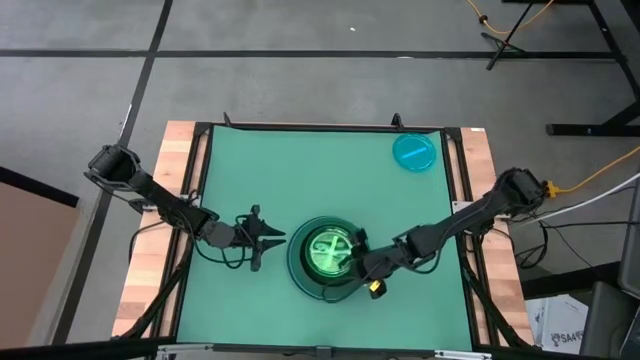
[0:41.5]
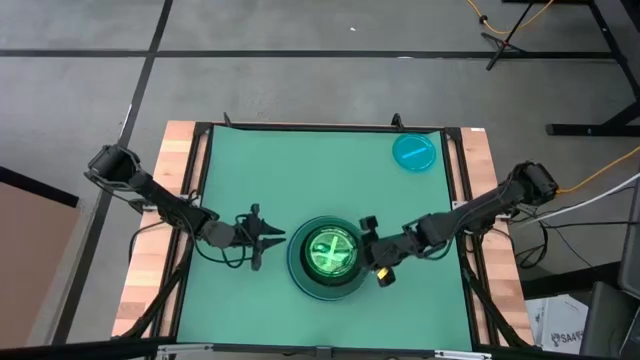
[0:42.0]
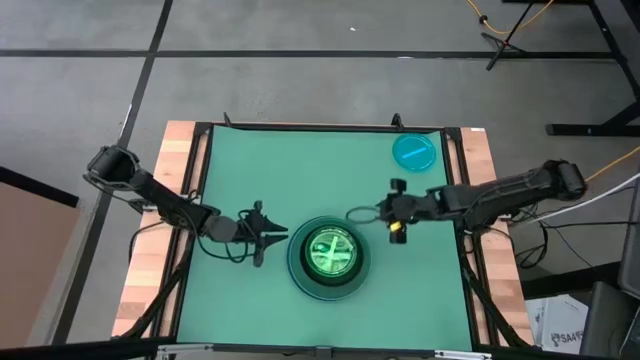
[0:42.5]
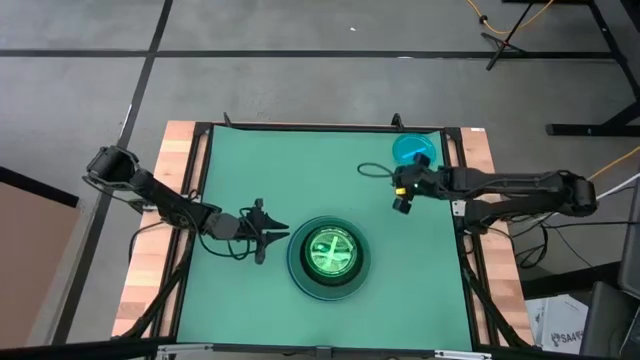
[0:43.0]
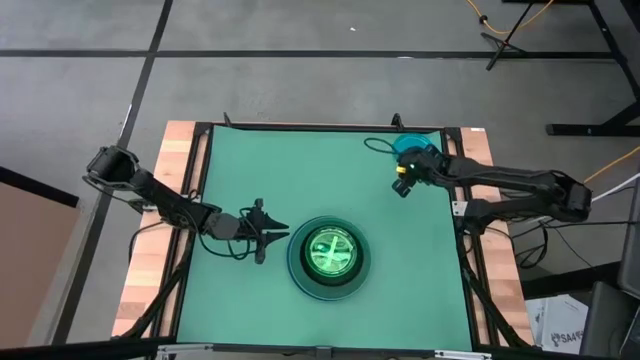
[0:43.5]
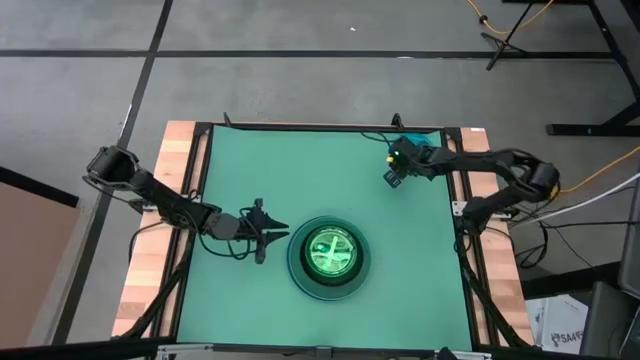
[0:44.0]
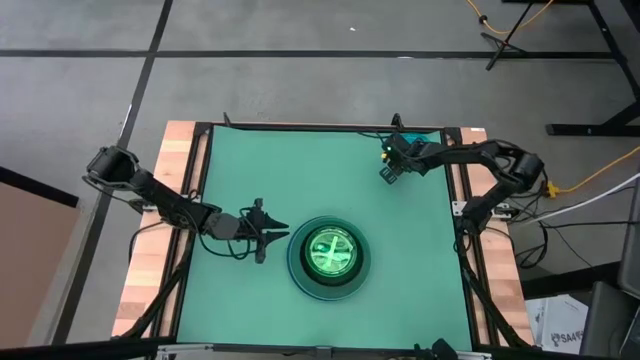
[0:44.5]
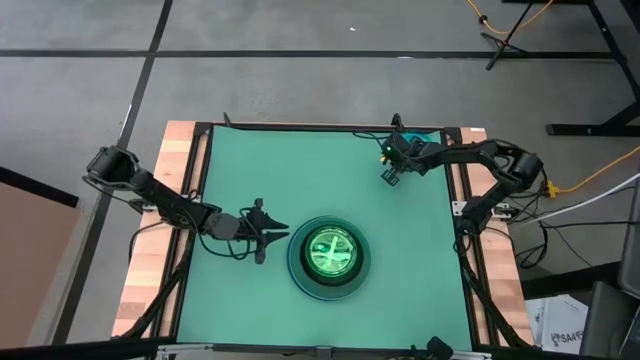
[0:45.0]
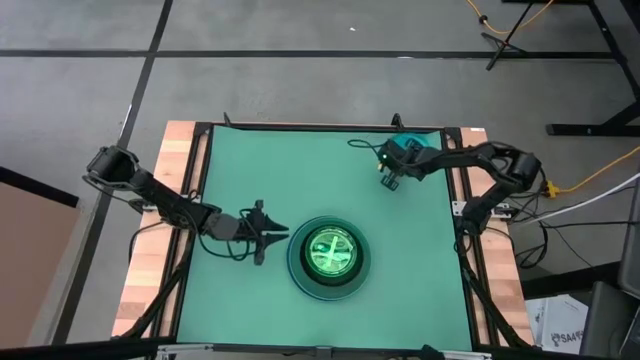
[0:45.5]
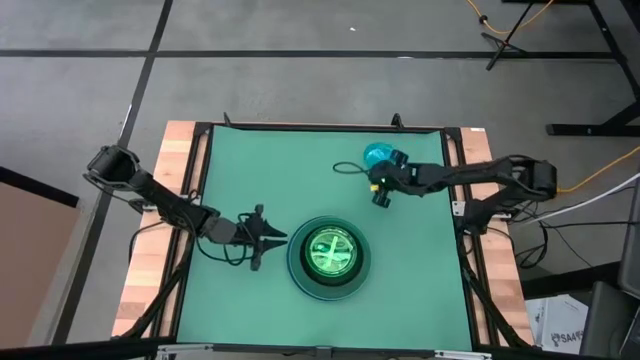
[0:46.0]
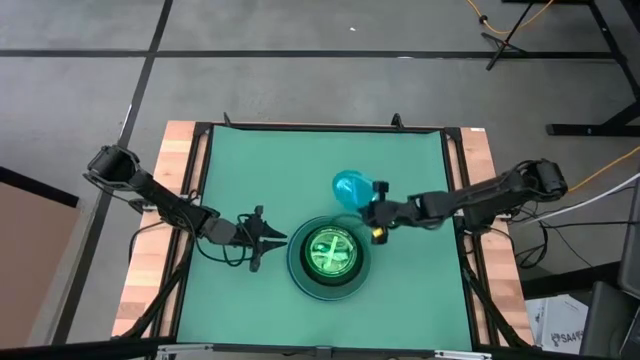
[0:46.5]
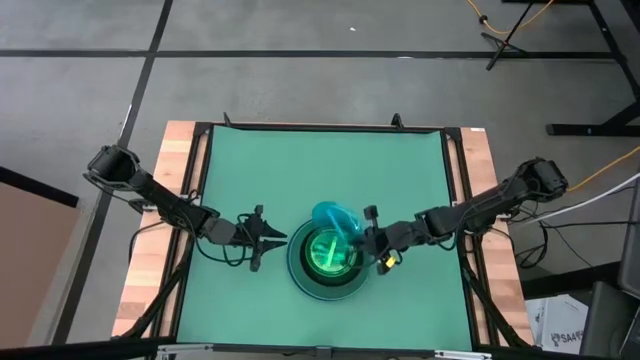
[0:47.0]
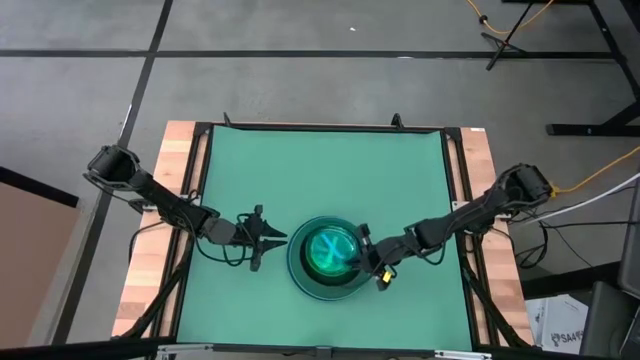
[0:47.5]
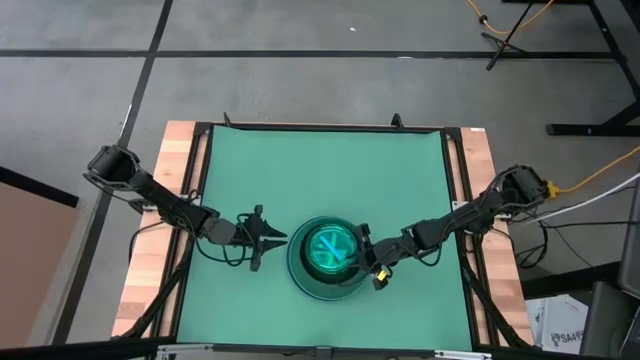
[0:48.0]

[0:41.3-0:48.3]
Task: Stack plastic plates
Stack the blue plate on the green plate

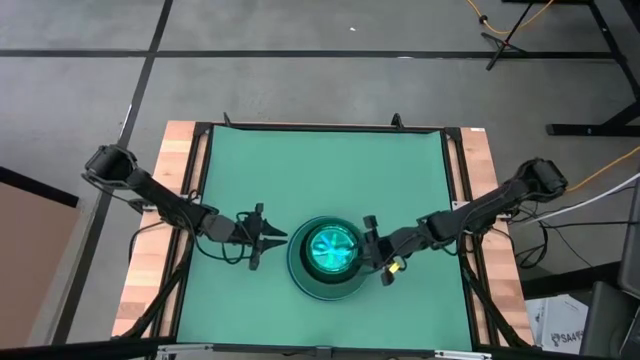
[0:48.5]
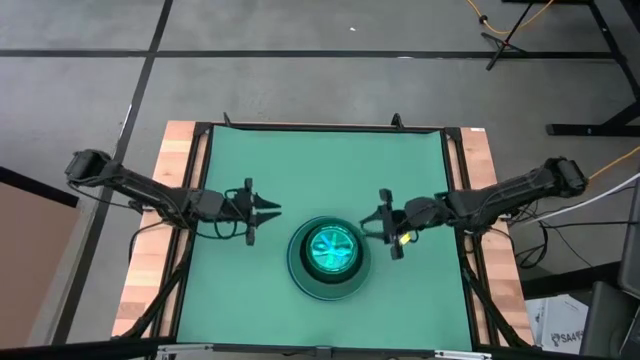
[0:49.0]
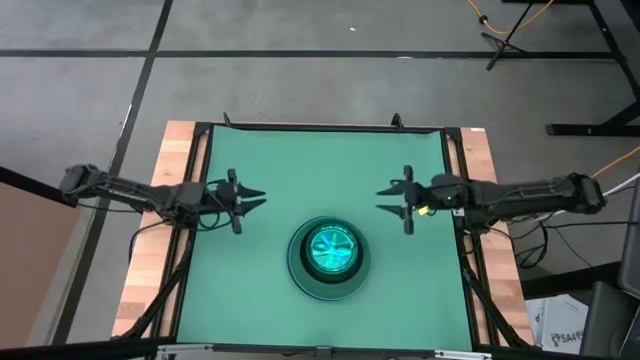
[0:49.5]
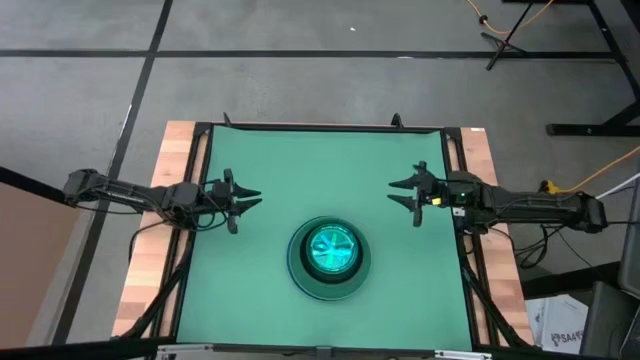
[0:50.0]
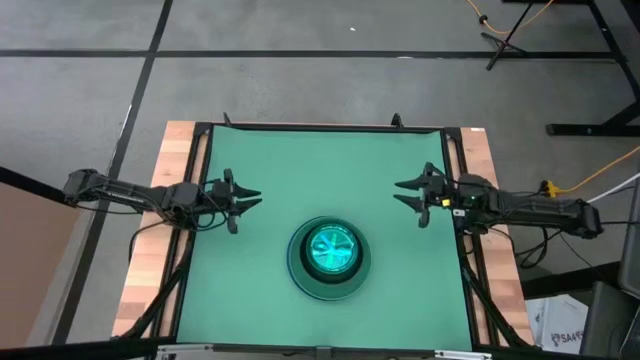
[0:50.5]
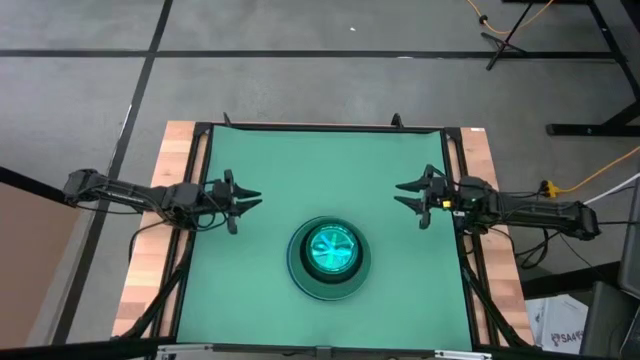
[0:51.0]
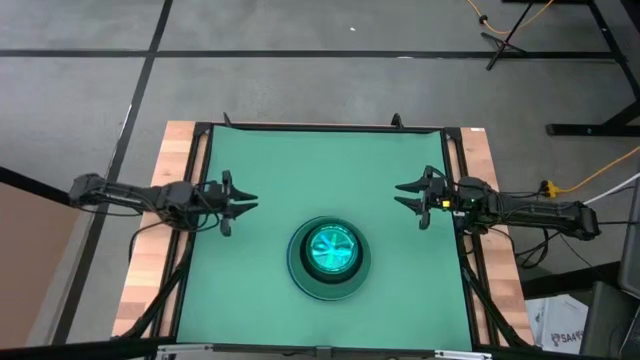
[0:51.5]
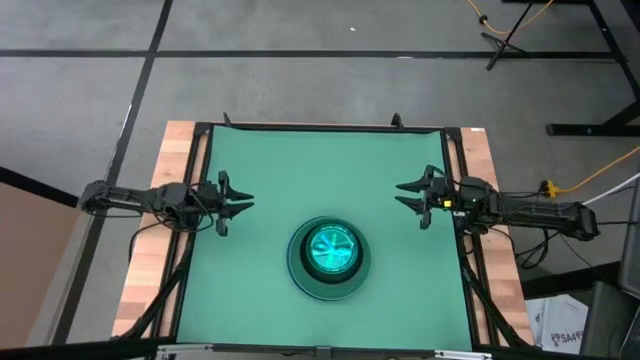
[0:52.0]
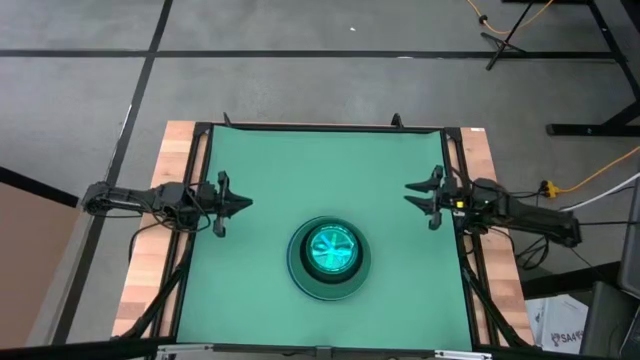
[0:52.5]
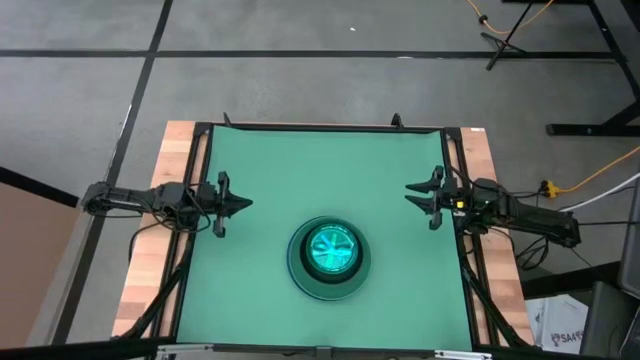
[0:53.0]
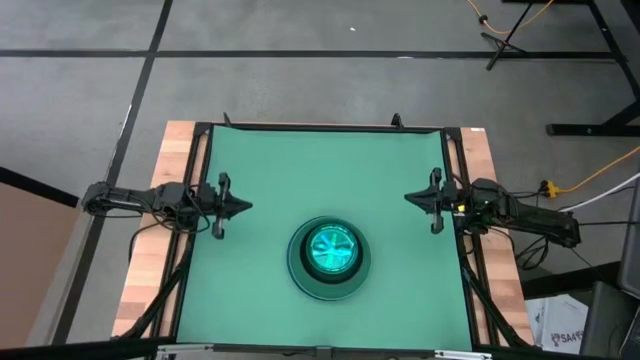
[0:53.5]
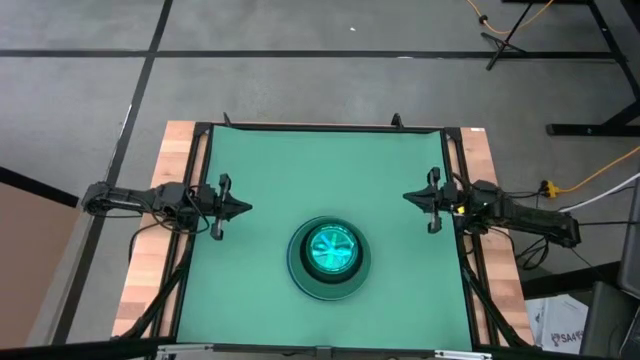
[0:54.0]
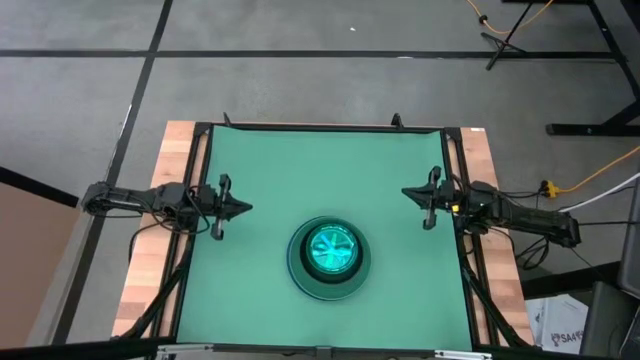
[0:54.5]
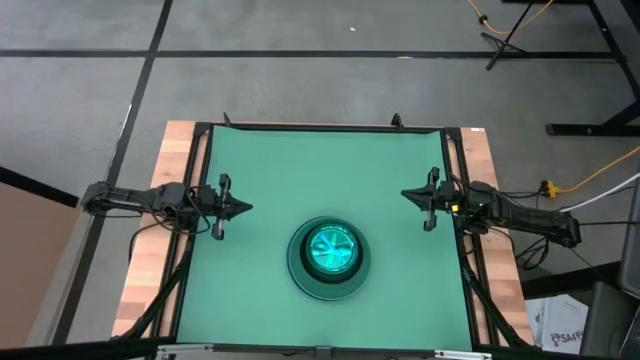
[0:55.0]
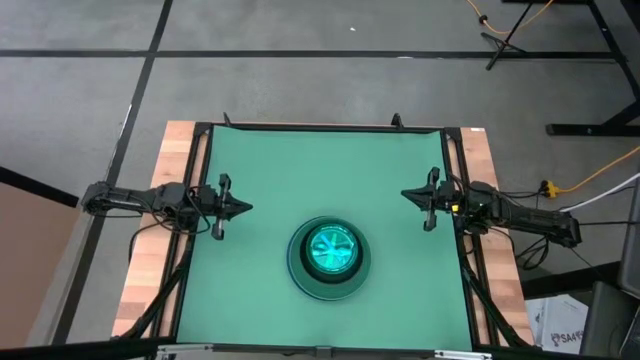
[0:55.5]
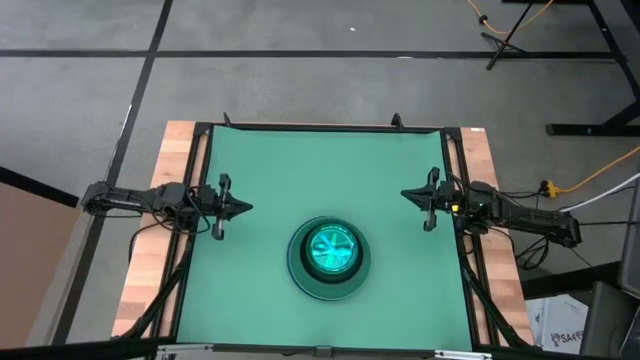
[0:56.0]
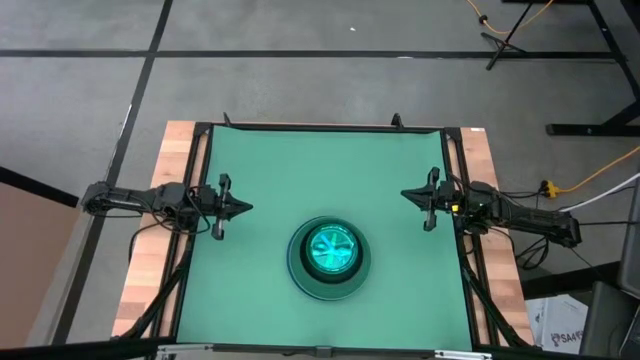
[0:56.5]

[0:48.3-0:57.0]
Return to Home Position
